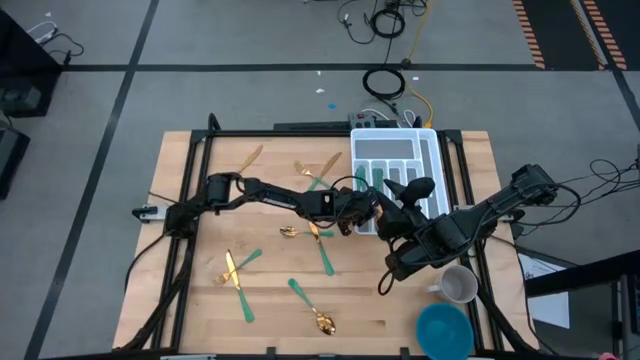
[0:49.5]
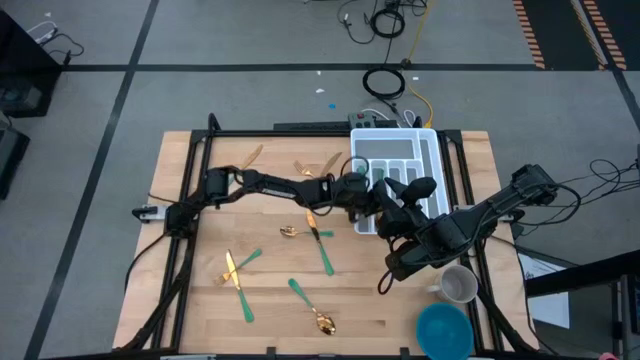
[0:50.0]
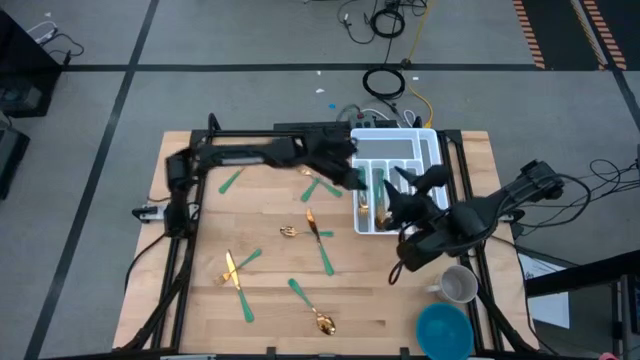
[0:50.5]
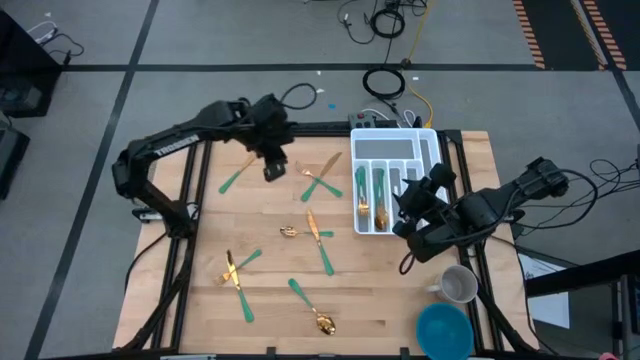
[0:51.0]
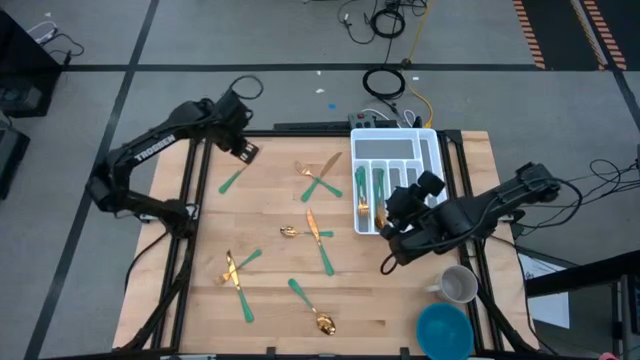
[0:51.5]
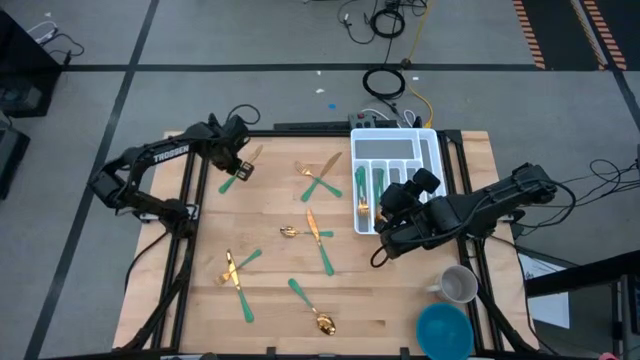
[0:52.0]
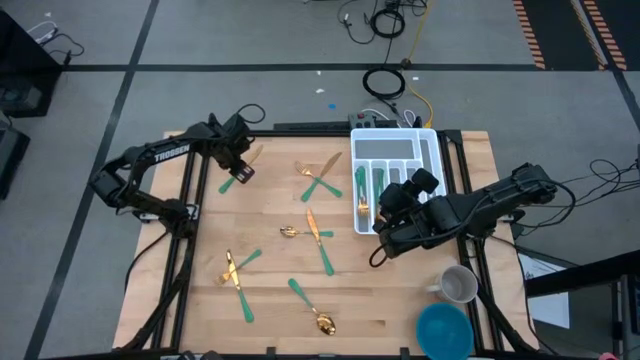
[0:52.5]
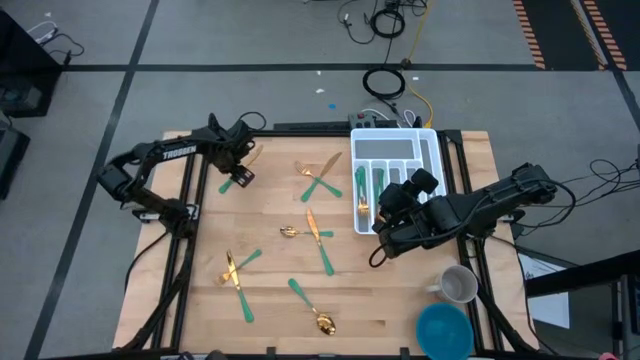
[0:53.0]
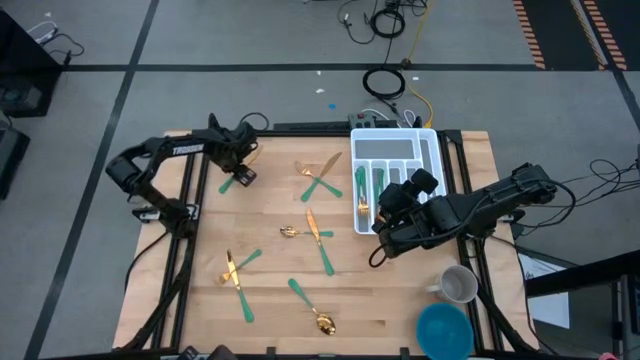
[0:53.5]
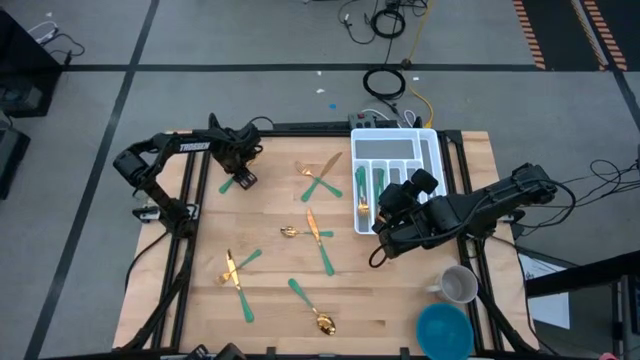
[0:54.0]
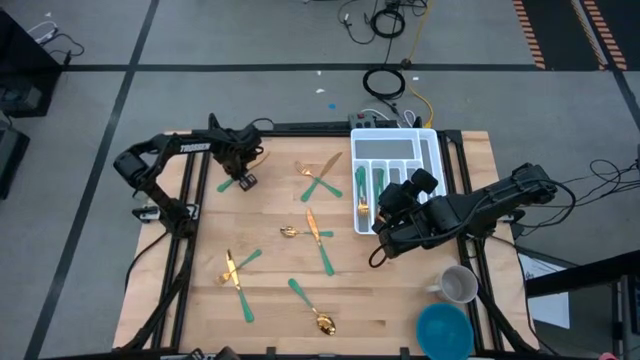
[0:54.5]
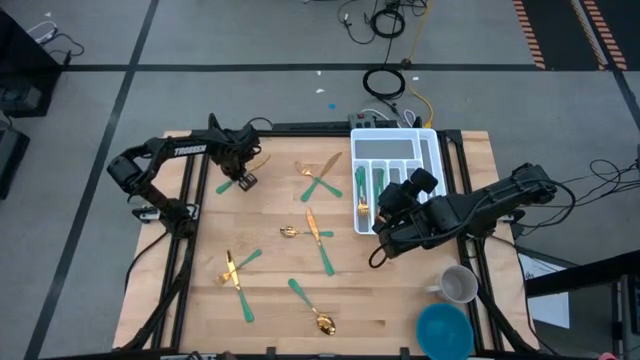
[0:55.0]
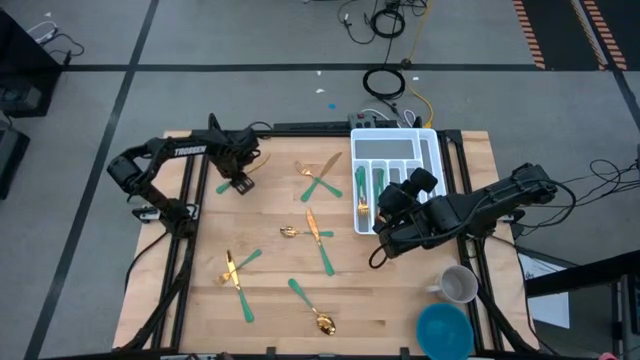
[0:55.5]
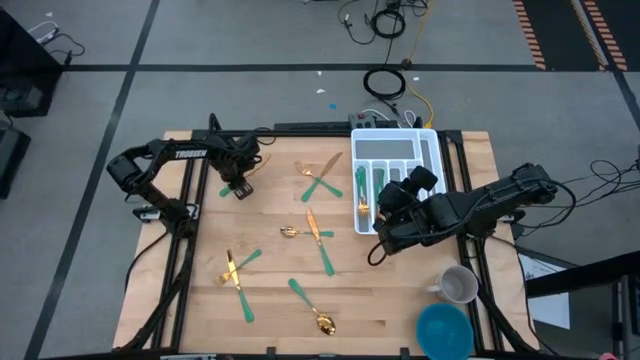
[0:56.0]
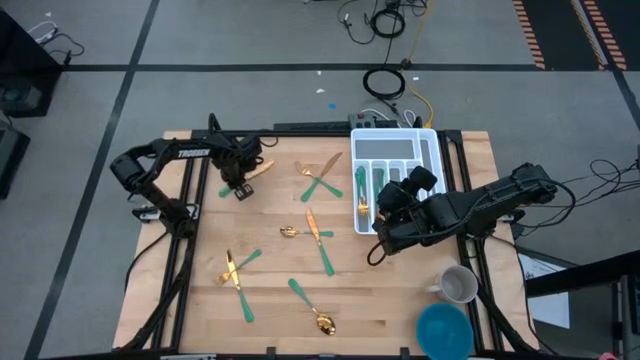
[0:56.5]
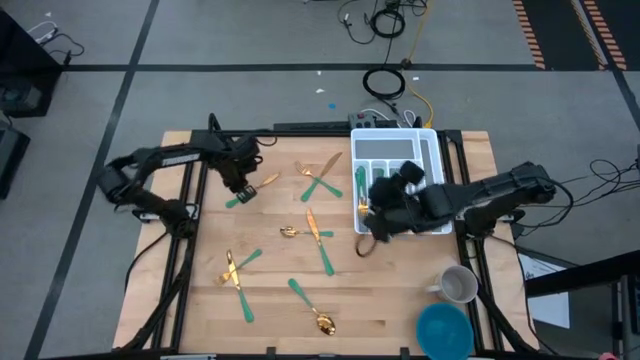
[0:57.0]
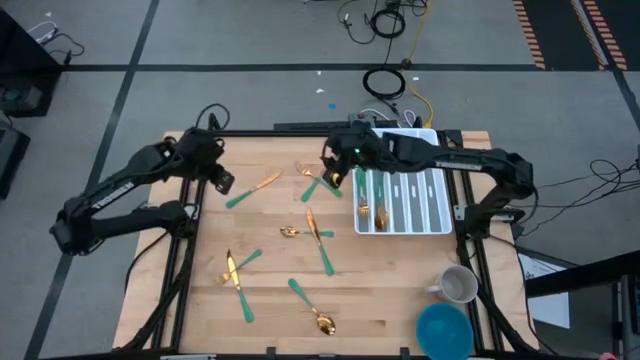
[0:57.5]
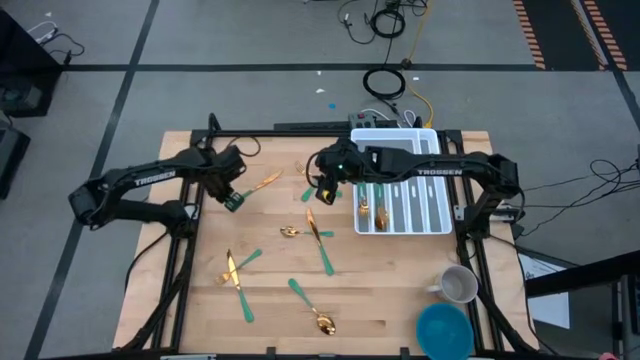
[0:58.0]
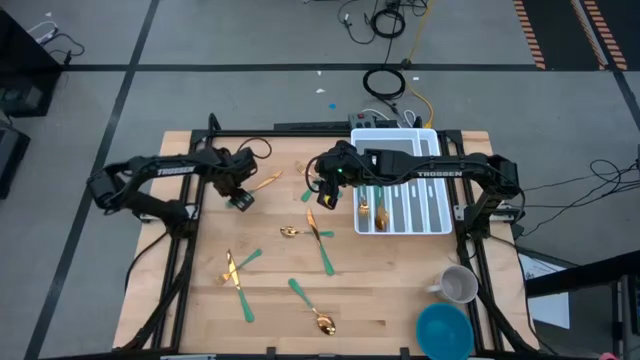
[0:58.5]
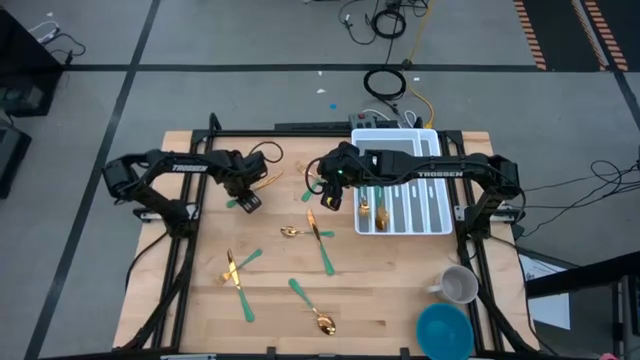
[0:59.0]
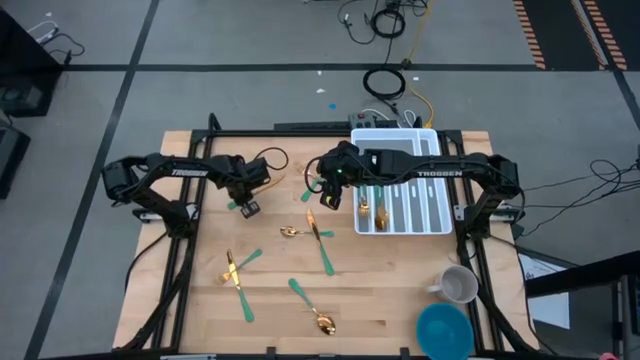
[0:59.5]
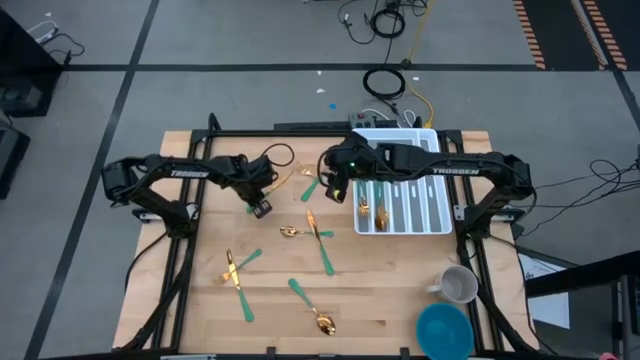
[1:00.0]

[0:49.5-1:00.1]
Task: Sort silverware
Put the knife into the silverware tray

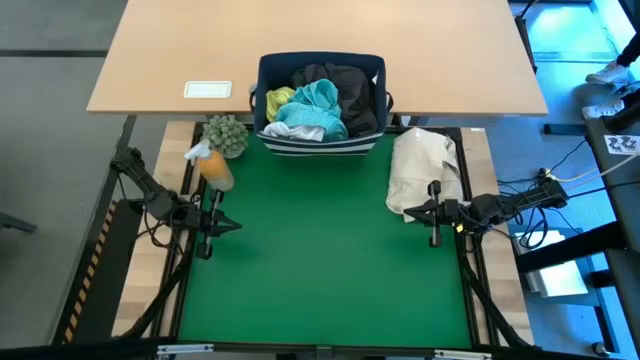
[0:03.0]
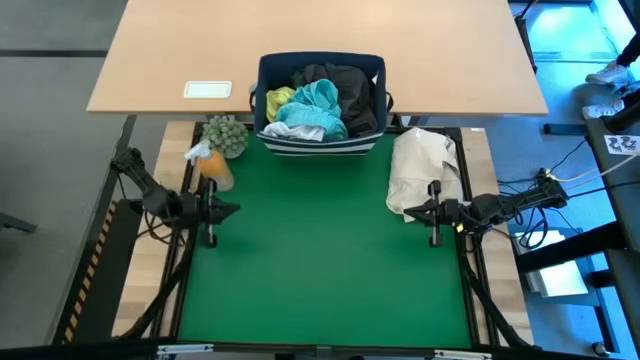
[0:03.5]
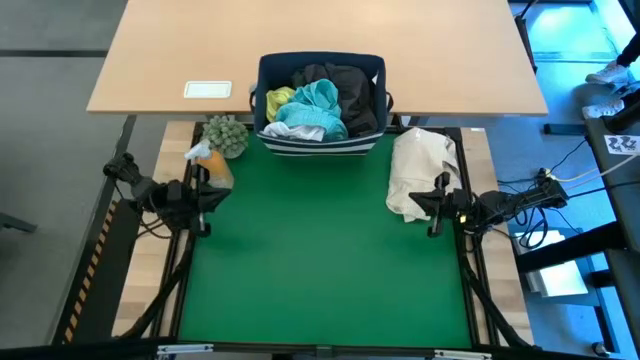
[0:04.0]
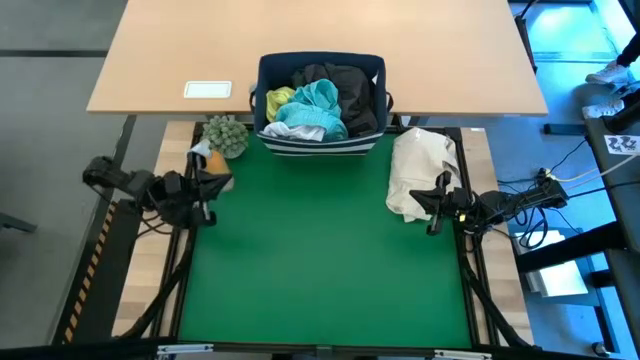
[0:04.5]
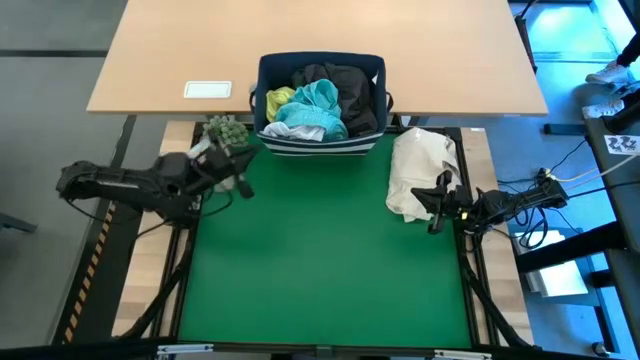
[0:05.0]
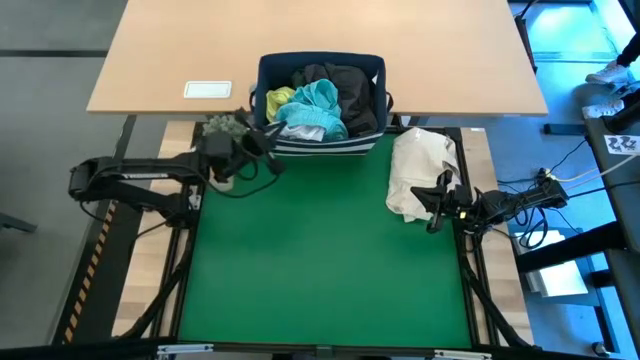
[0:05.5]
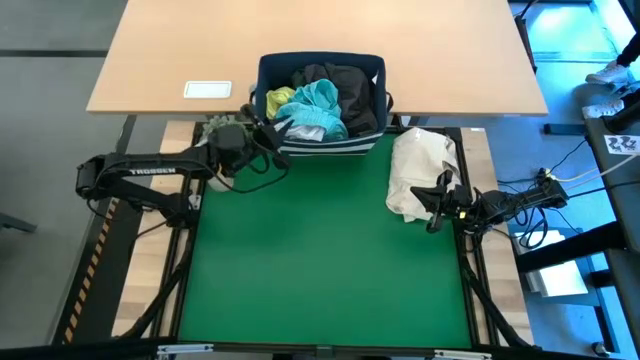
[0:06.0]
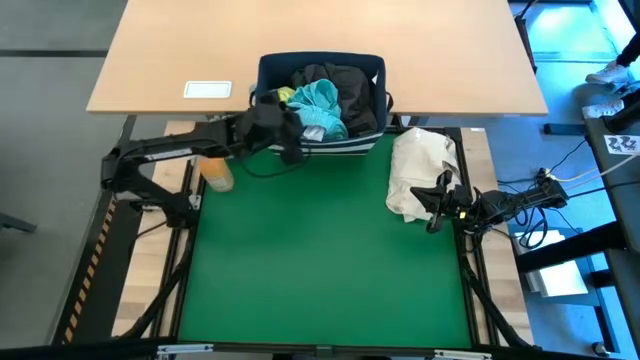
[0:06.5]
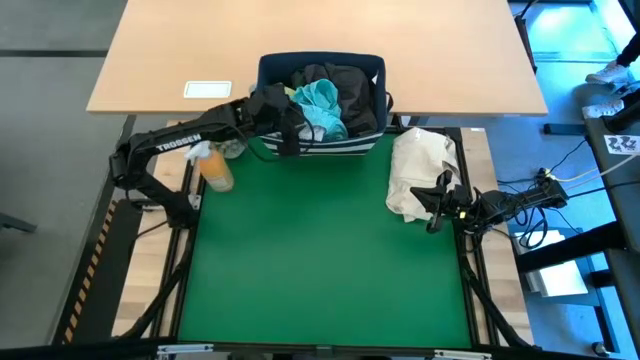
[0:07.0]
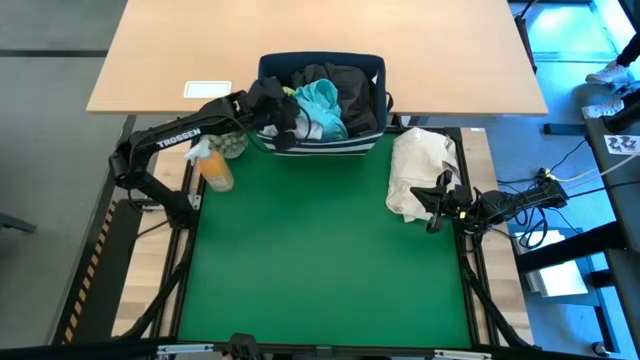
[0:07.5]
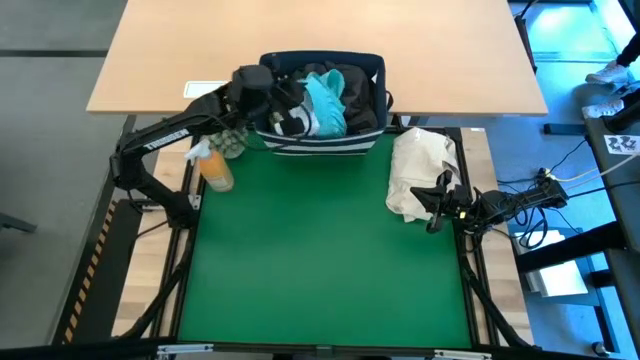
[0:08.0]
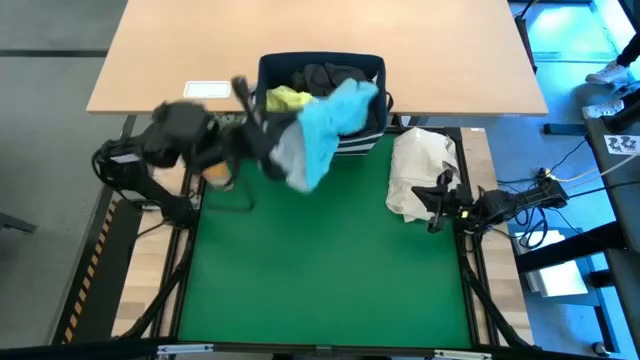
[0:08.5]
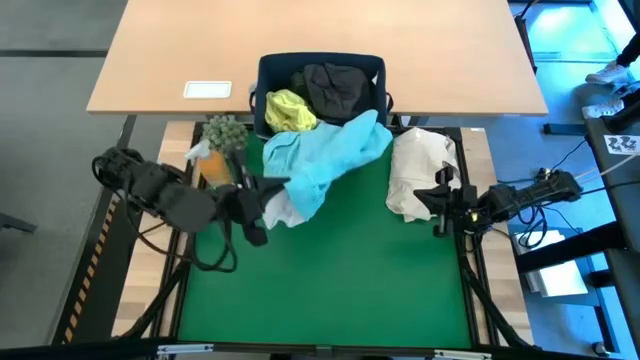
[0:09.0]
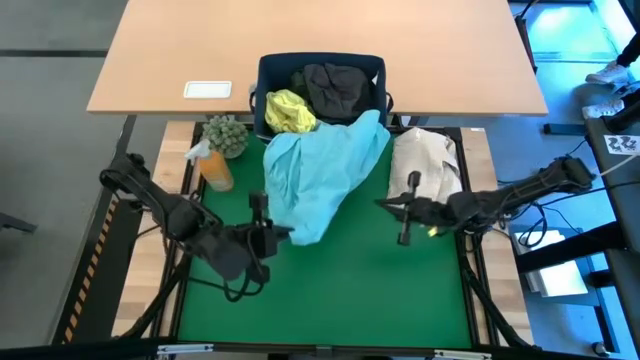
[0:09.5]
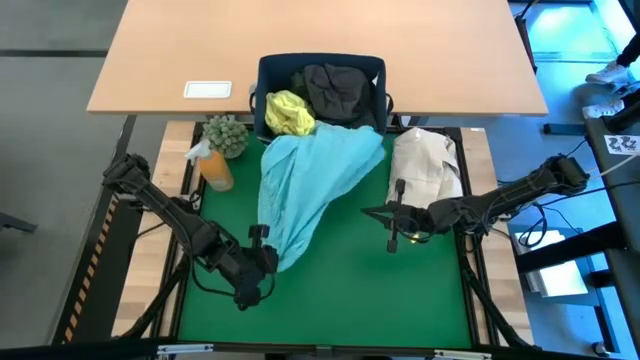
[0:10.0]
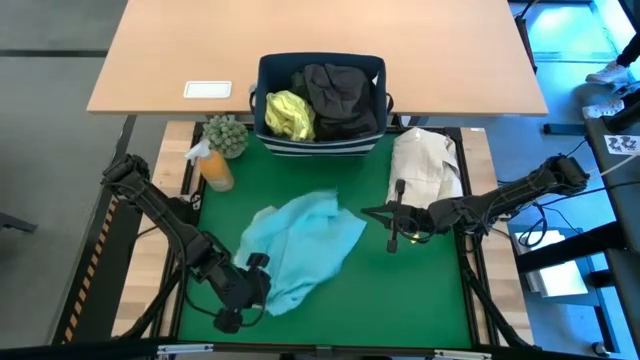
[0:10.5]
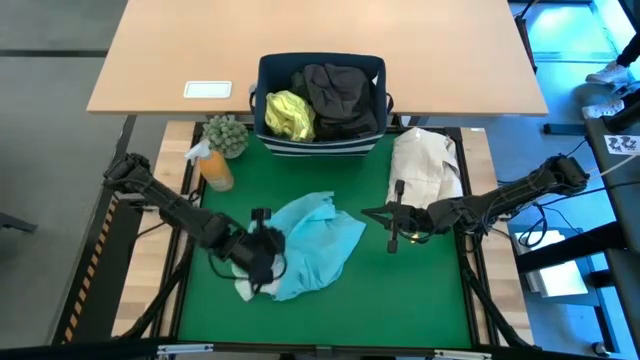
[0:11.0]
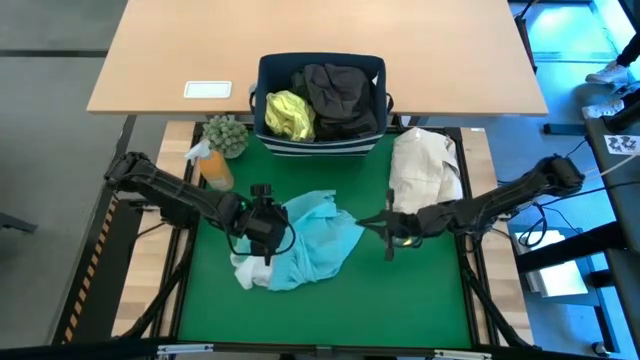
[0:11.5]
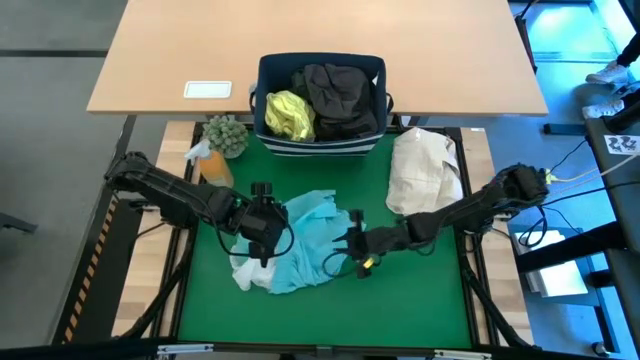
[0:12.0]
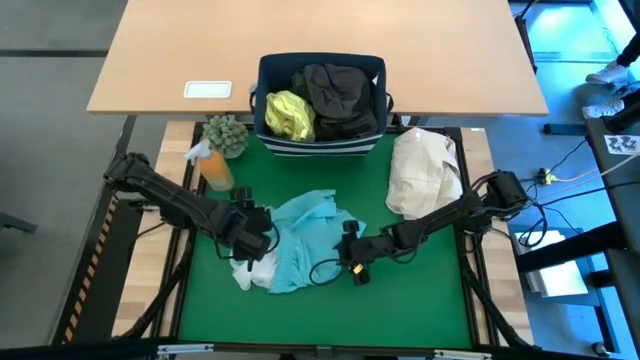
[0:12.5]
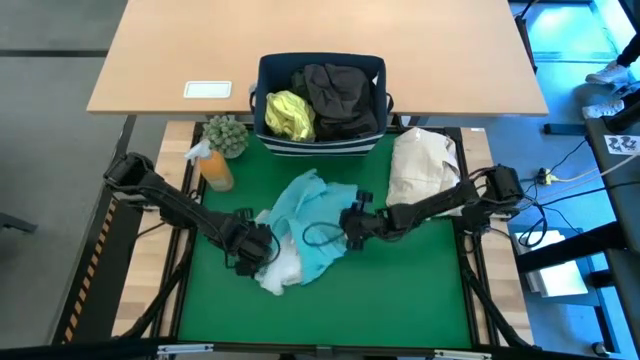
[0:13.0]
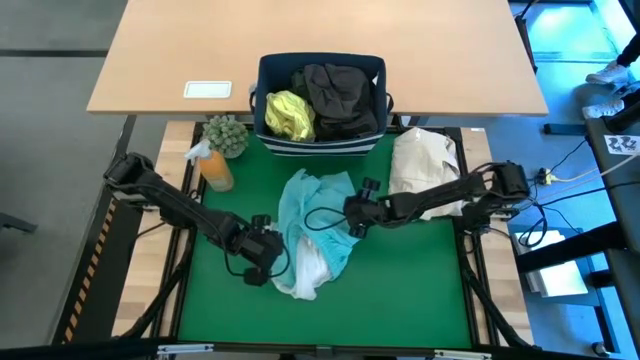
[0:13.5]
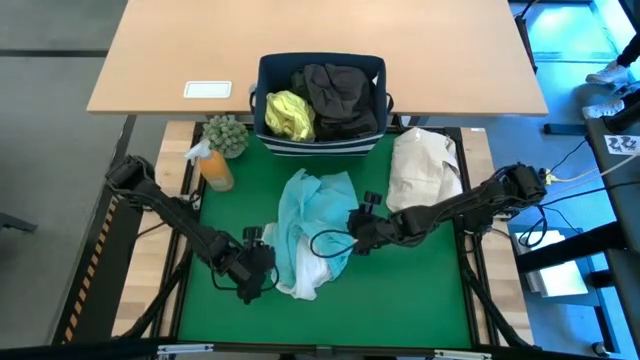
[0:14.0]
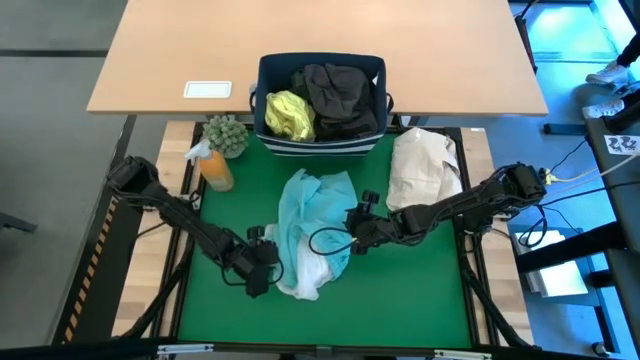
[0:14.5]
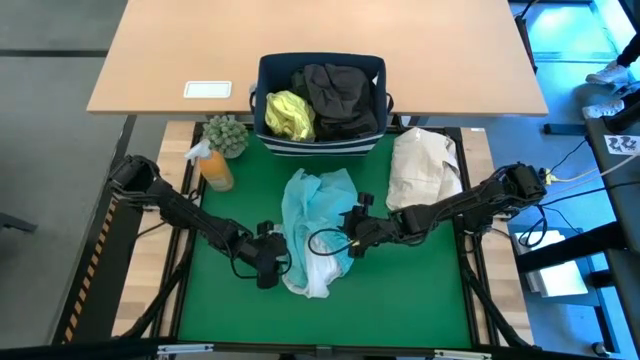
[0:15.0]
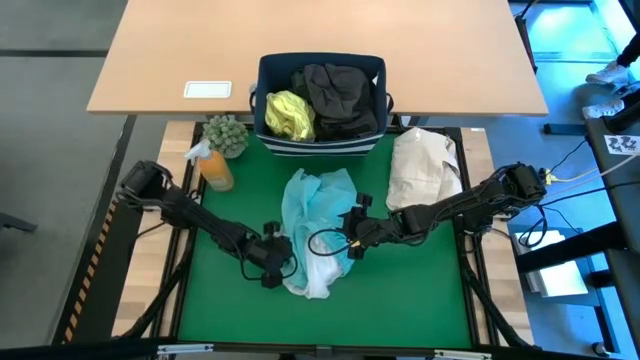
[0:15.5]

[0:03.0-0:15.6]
Task: Fold laundry
Fold the blue shorts
